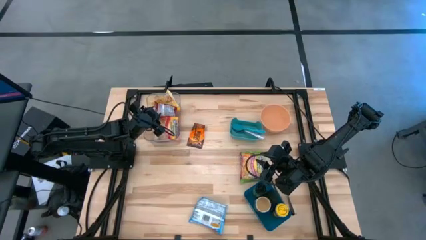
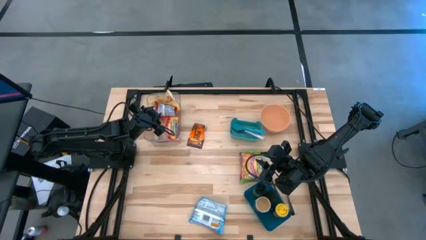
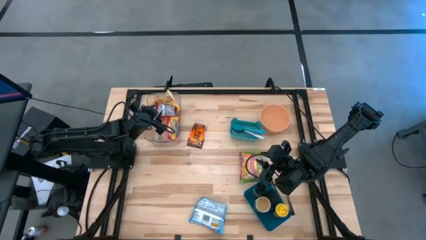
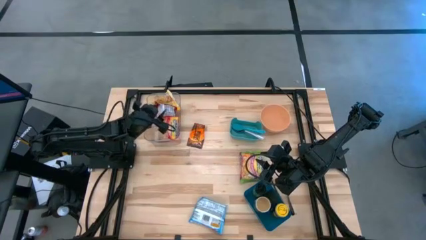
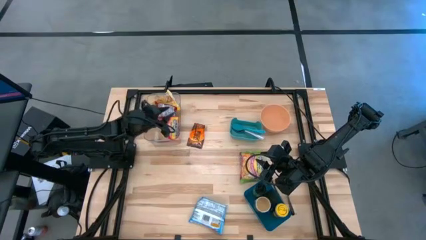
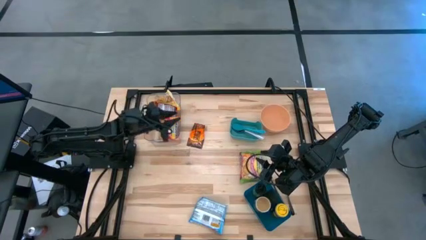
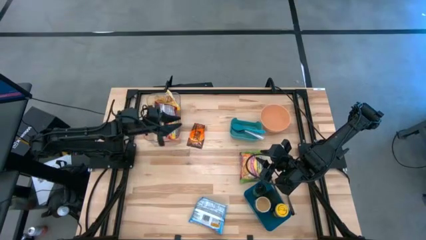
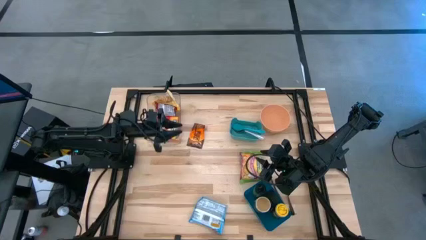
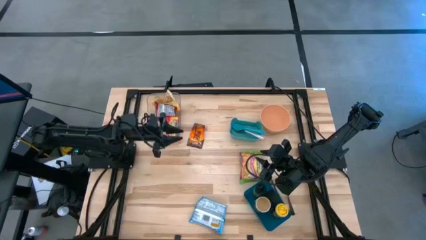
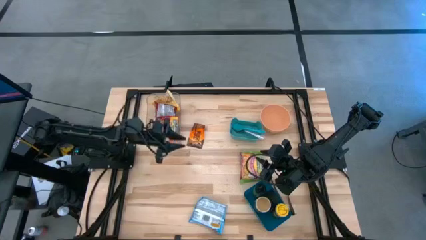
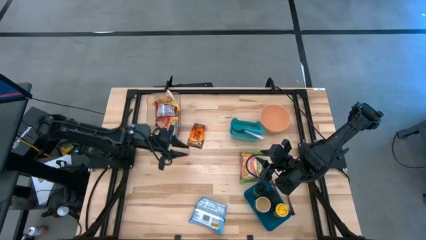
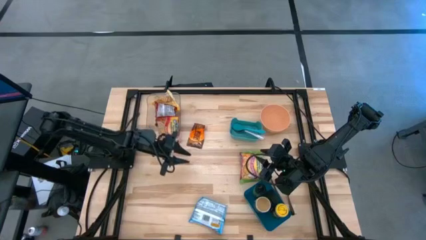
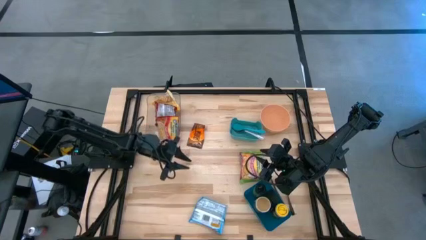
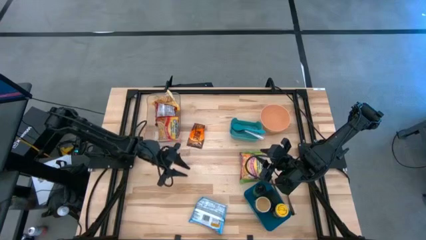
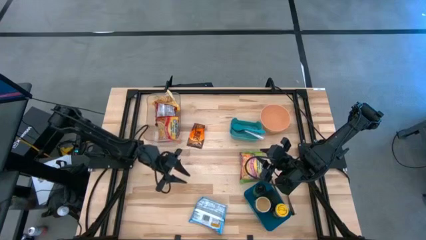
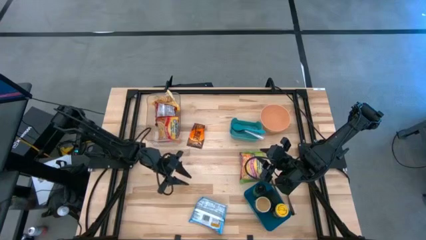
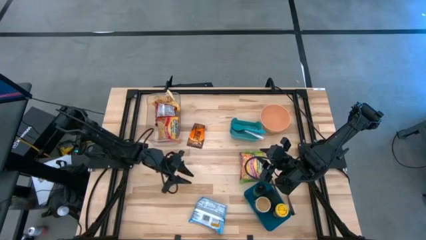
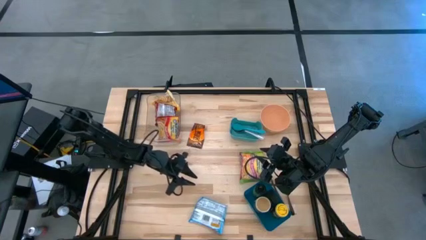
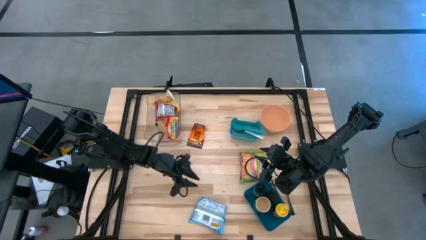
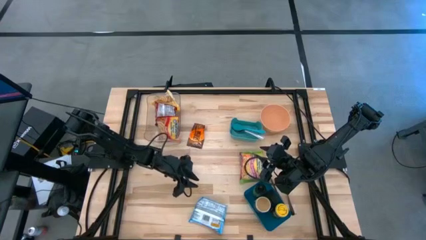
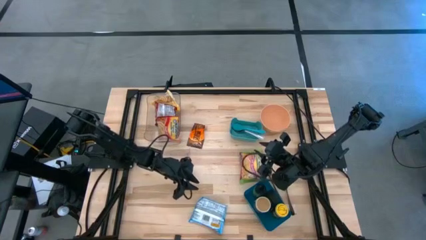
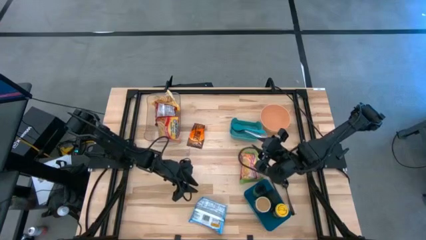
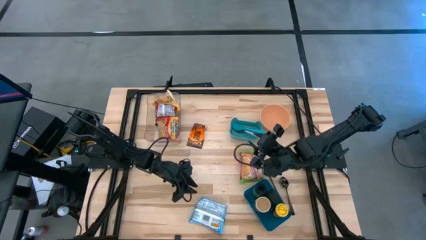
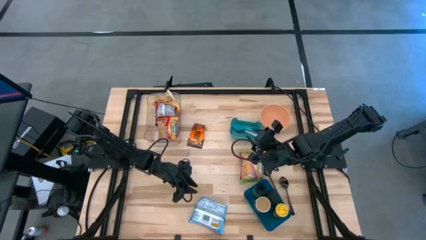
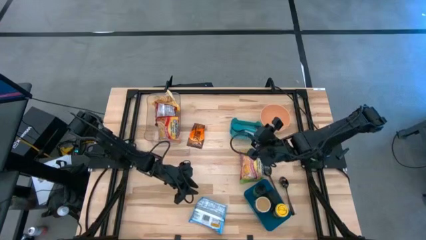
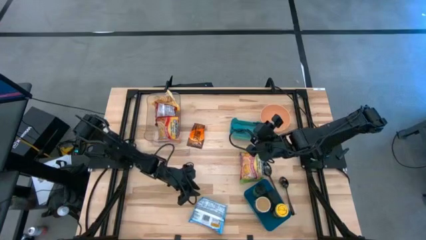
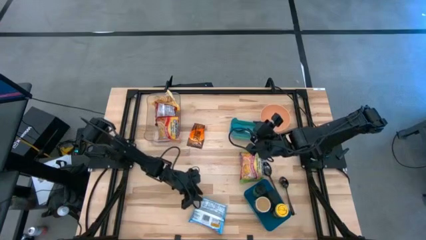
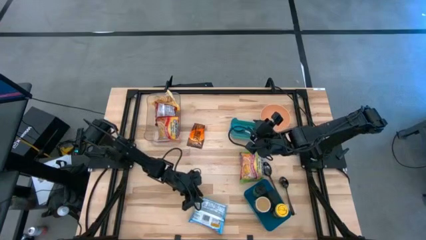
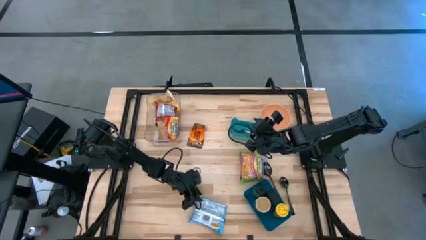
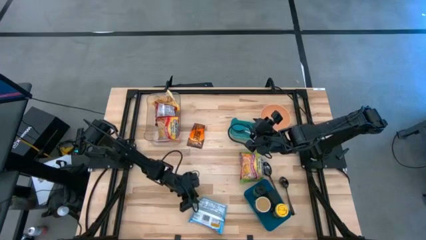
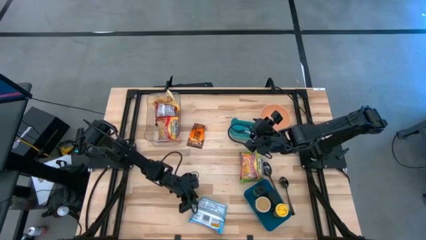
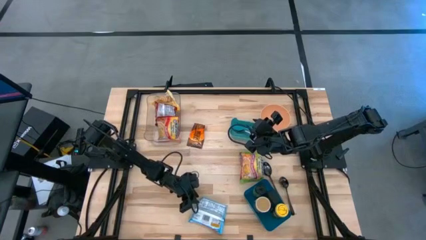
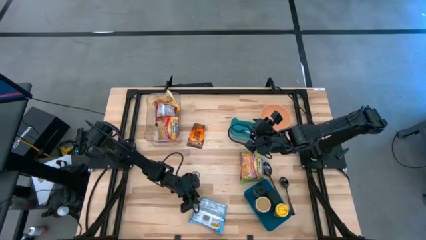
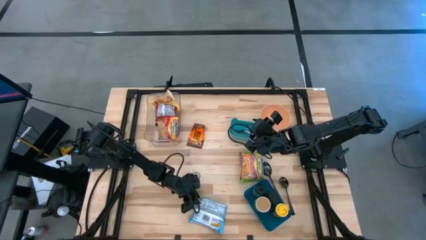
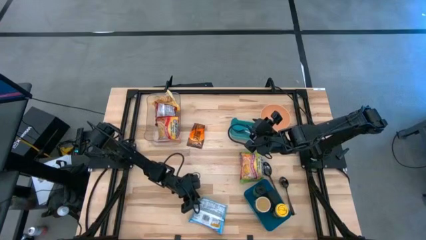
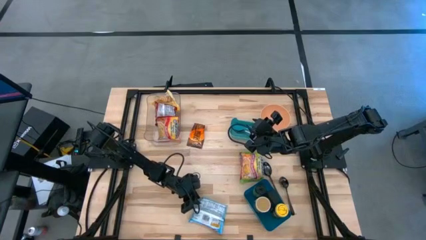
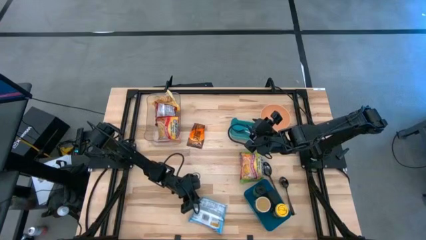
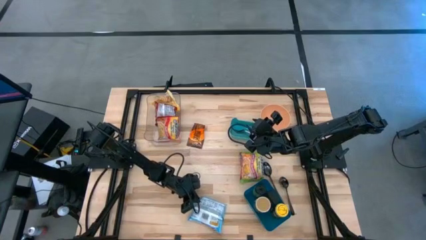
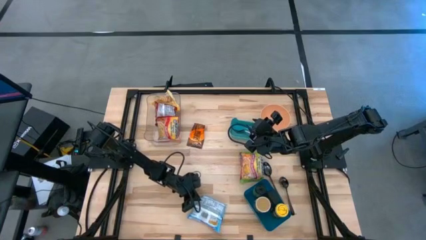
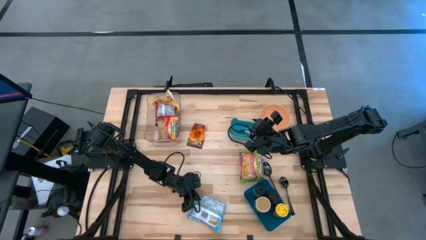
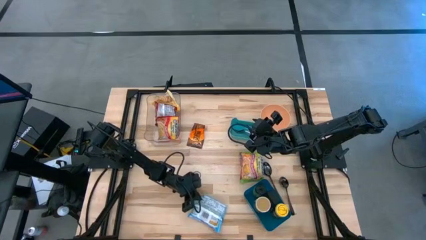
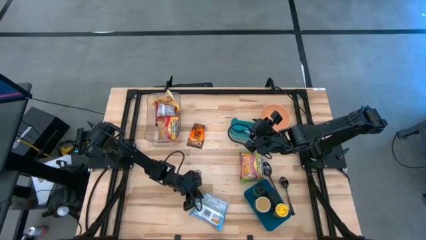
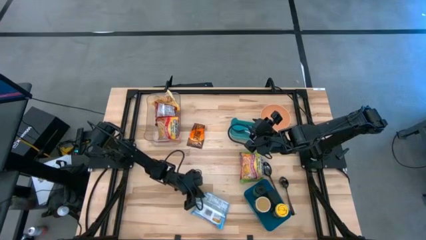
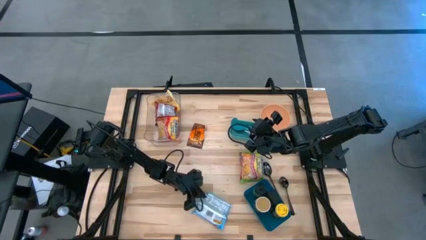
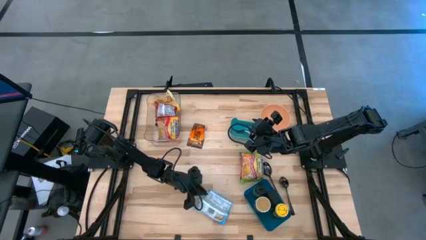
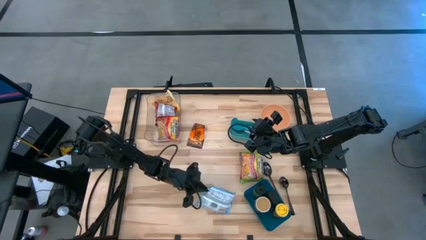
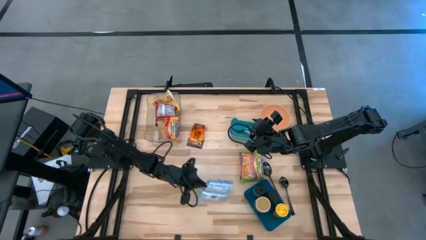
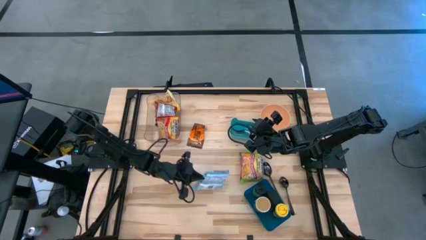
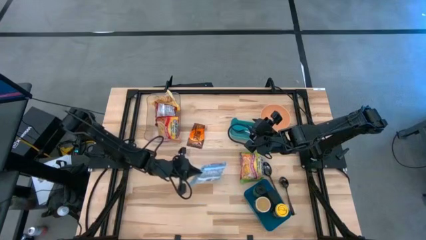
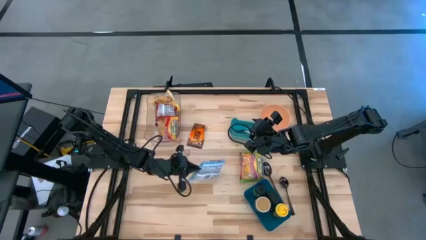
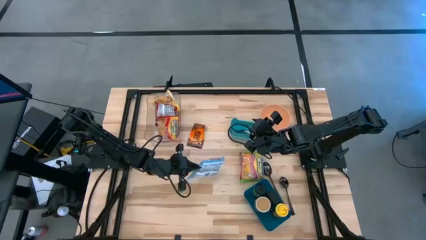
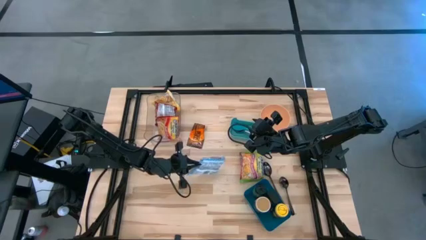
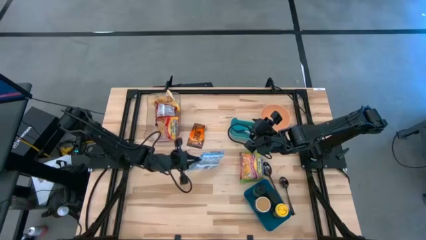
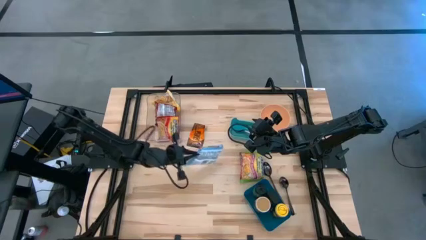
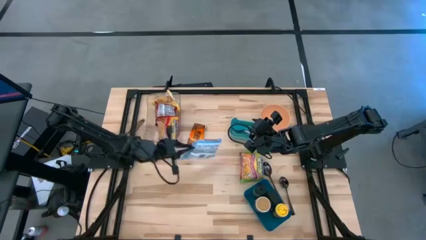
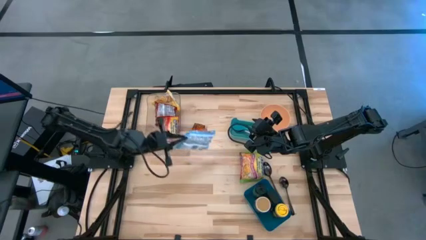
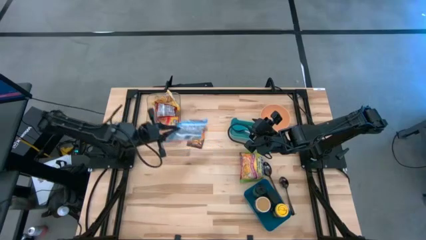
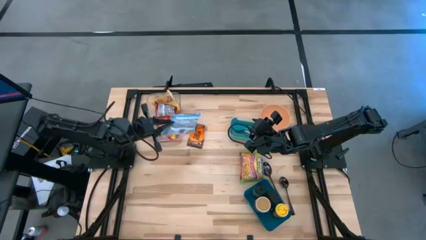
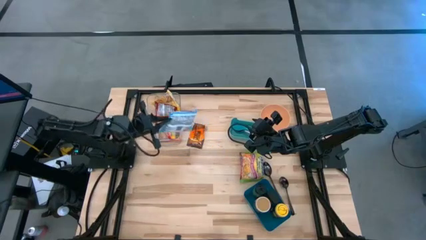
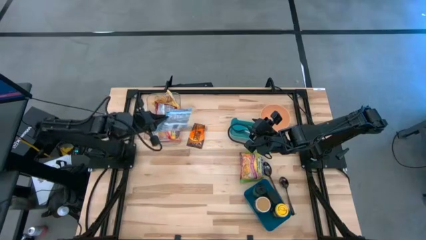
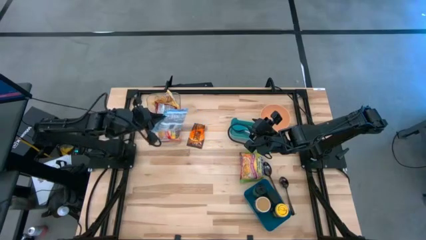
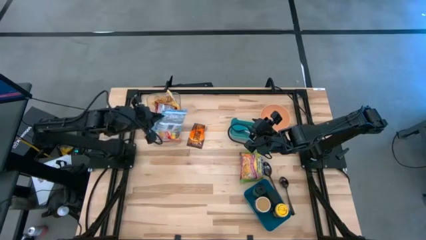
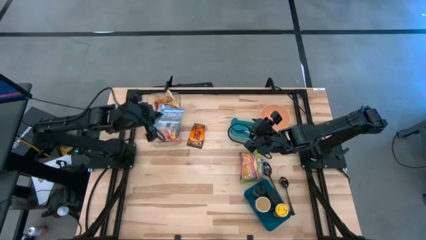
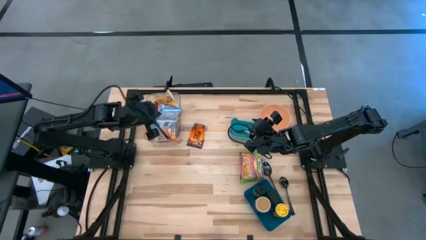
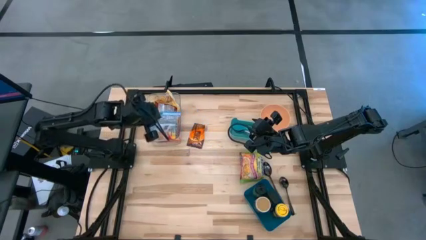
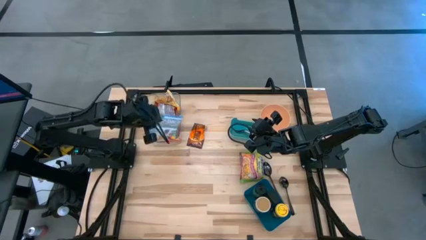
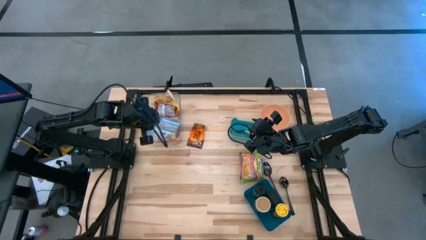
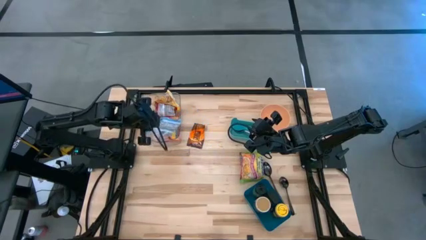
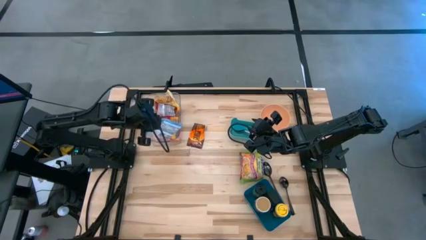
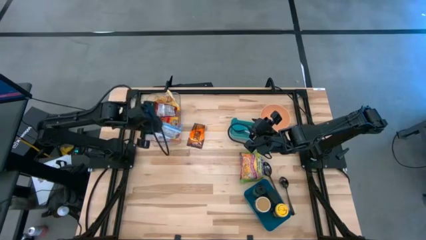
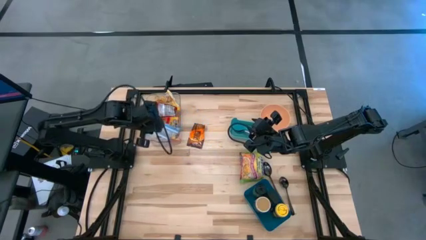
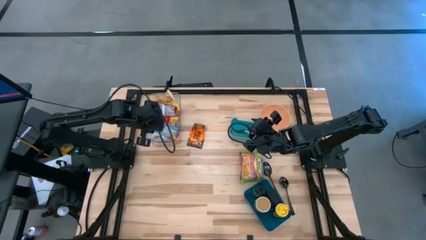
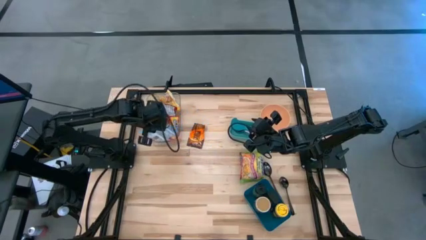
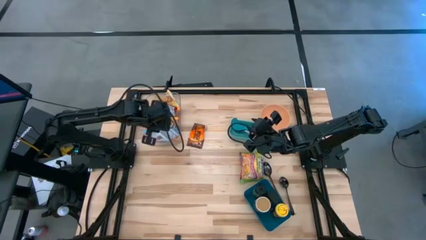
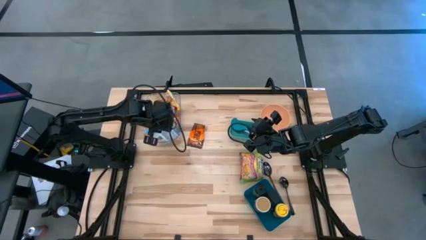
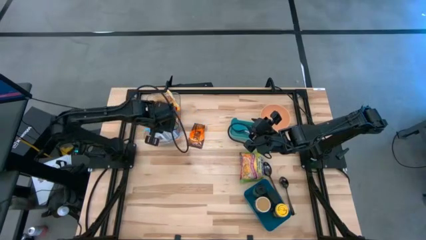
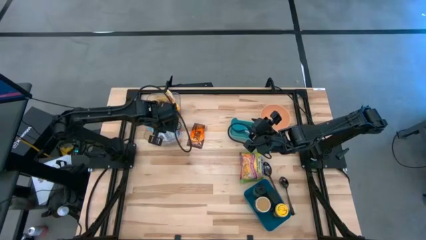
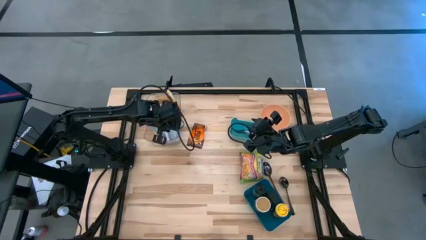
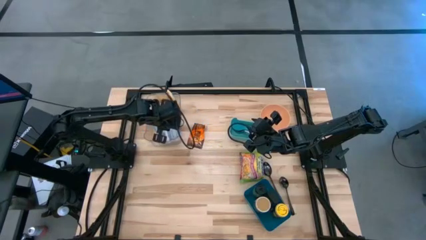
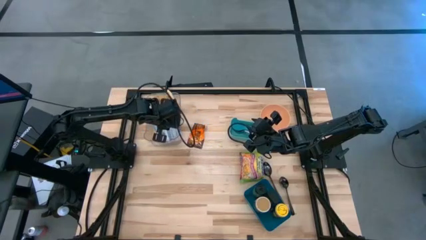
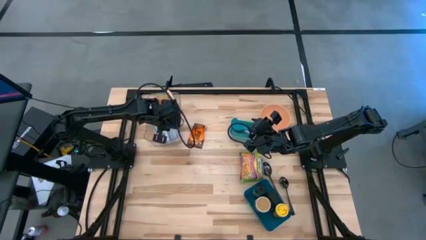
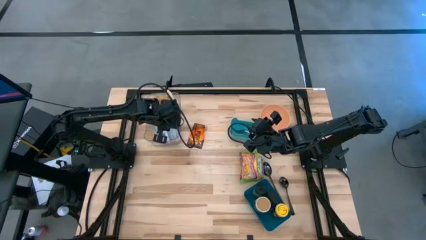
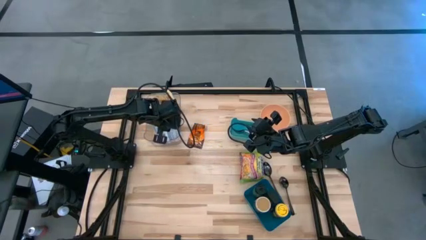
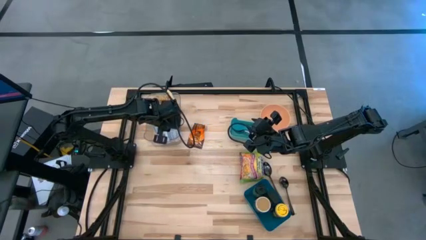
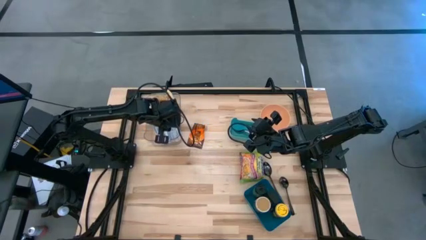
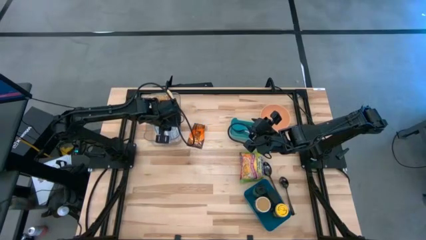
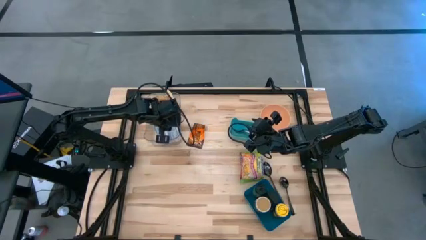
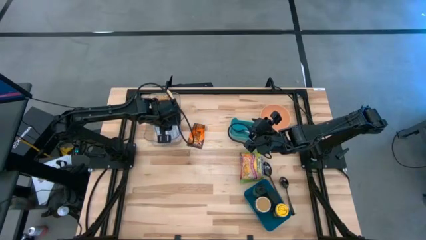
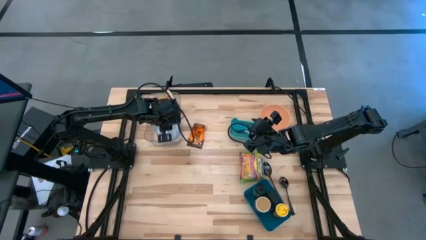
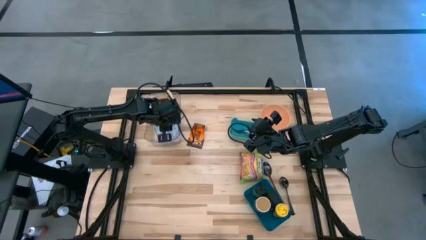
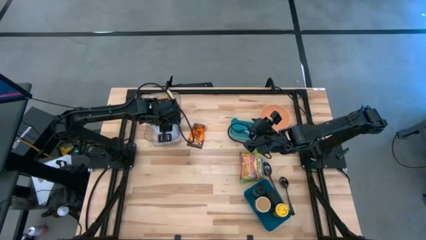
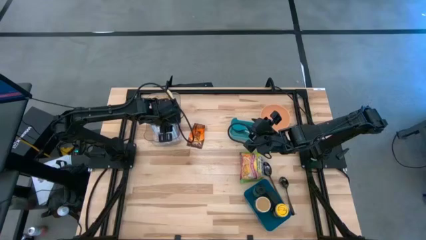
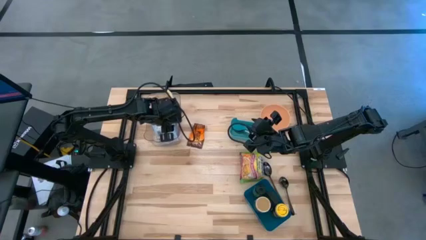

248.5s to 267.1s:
Task: Pick & Place Food Item
Put the blue noodle pack into the transparent bin
